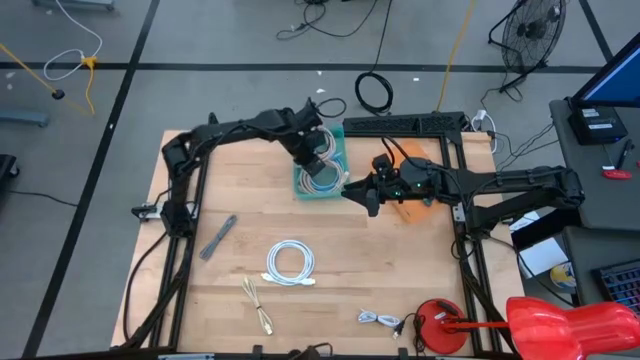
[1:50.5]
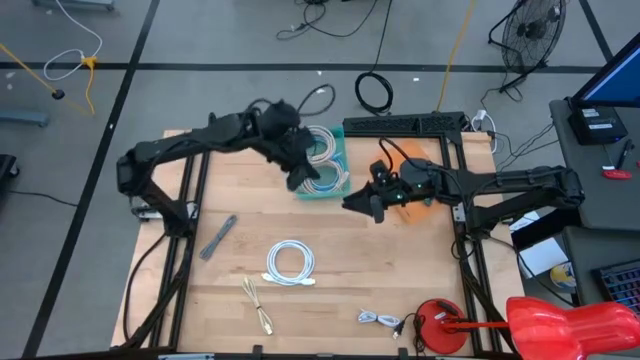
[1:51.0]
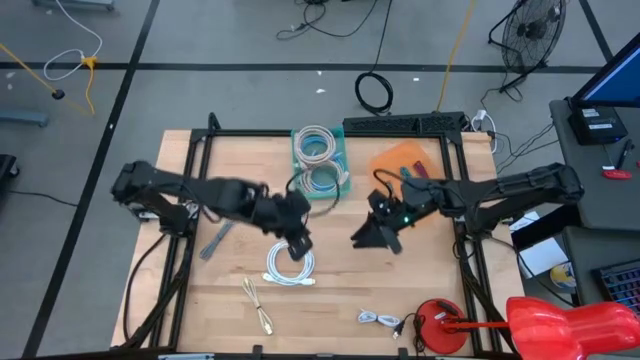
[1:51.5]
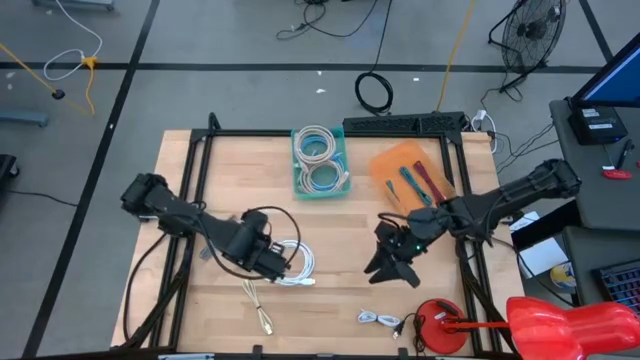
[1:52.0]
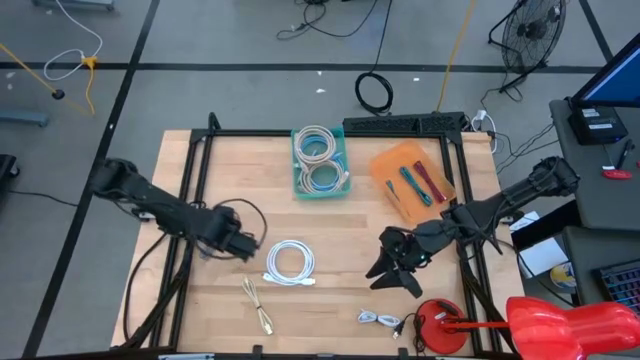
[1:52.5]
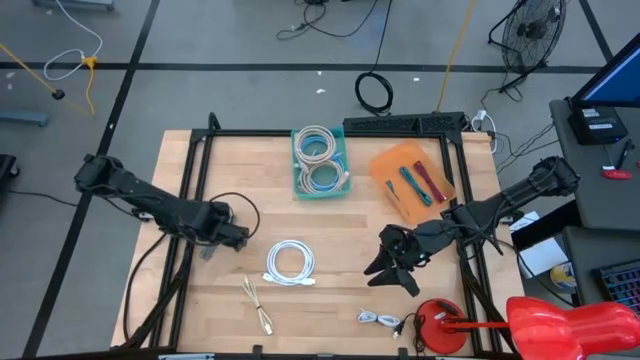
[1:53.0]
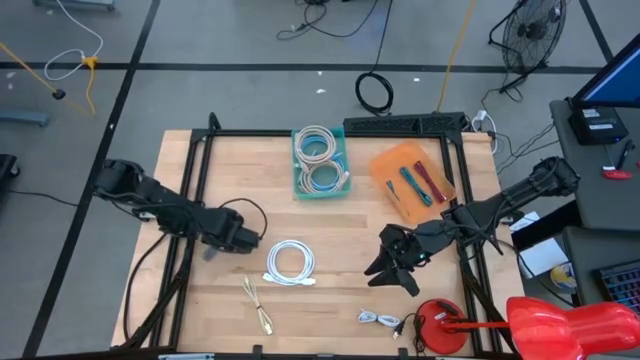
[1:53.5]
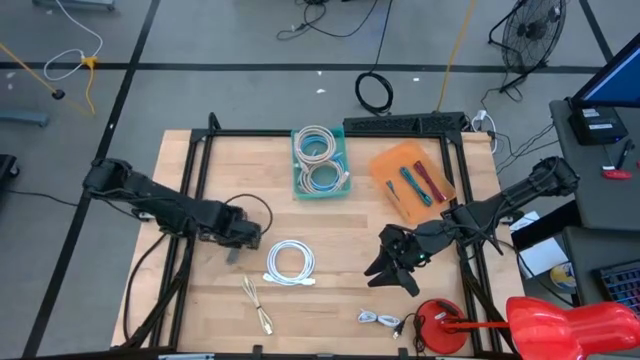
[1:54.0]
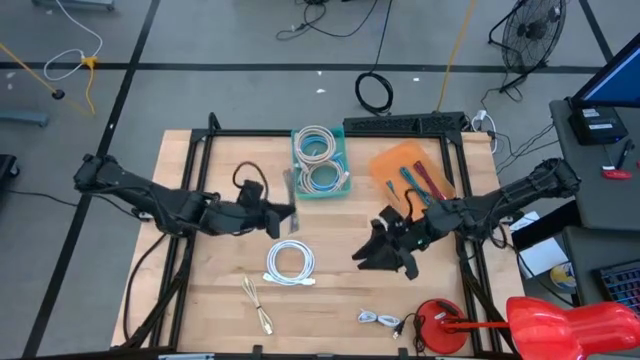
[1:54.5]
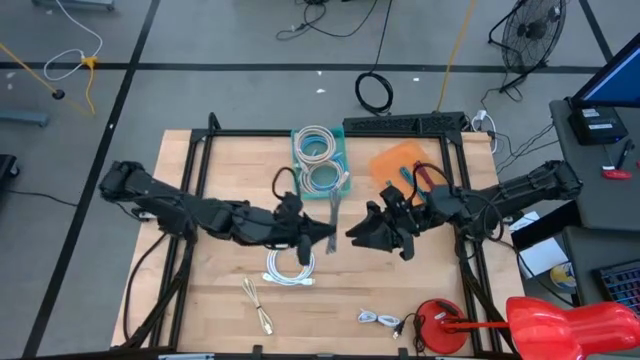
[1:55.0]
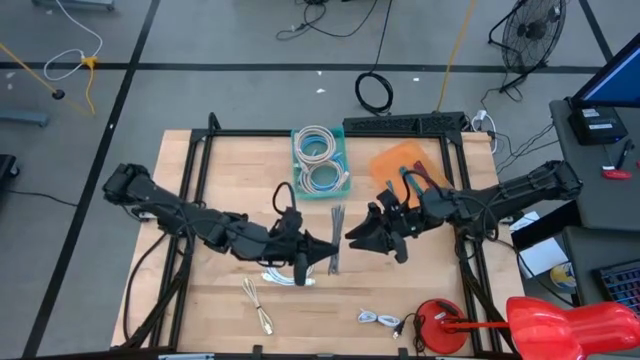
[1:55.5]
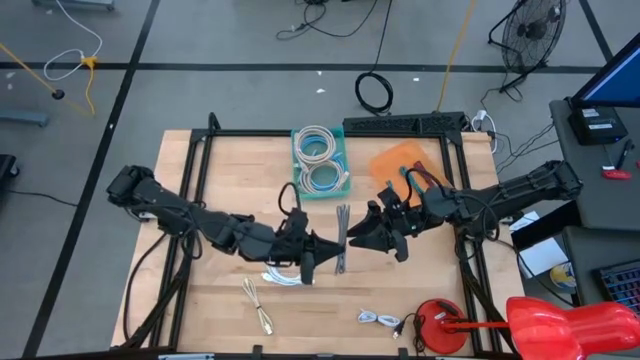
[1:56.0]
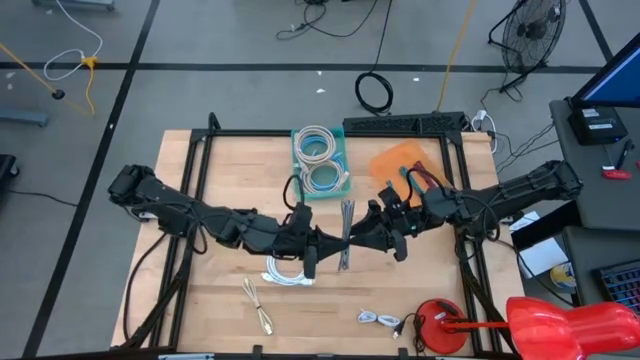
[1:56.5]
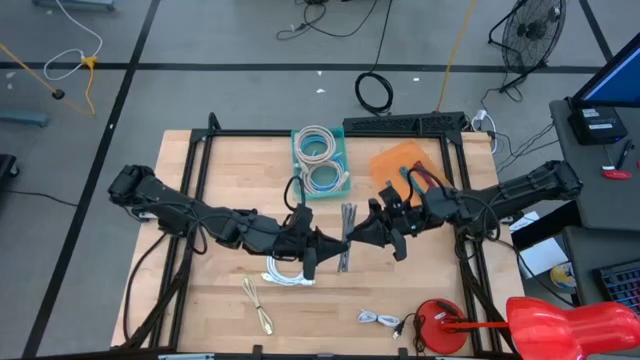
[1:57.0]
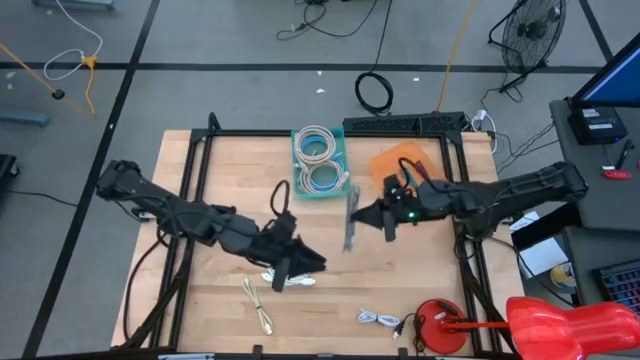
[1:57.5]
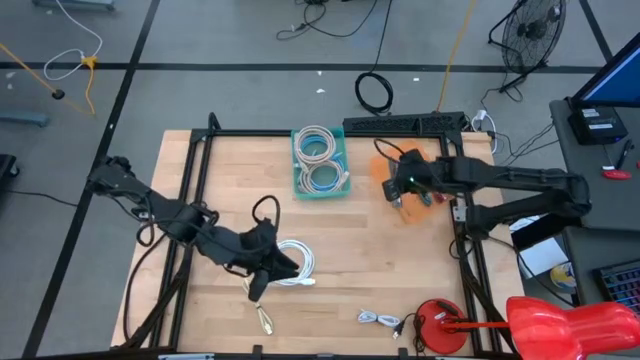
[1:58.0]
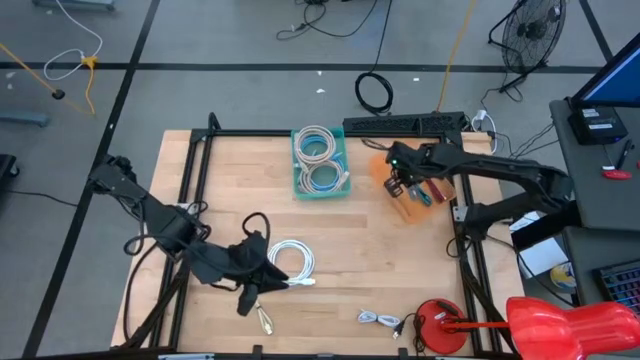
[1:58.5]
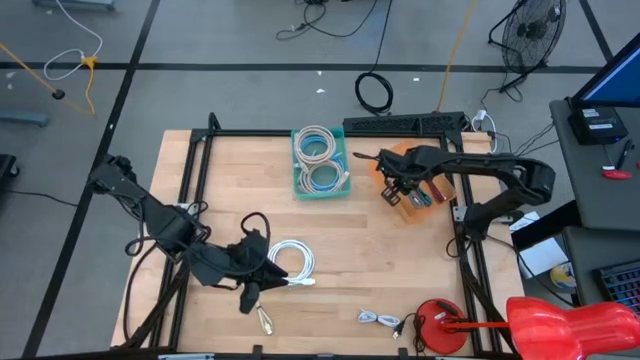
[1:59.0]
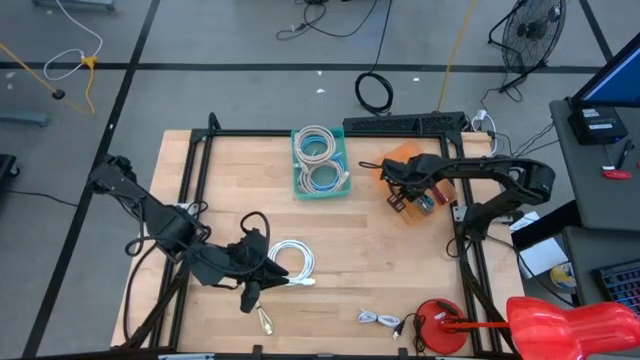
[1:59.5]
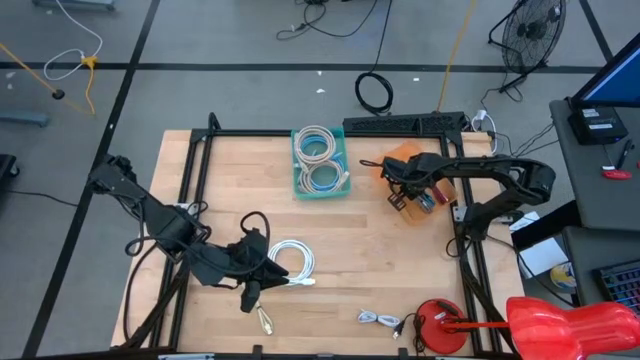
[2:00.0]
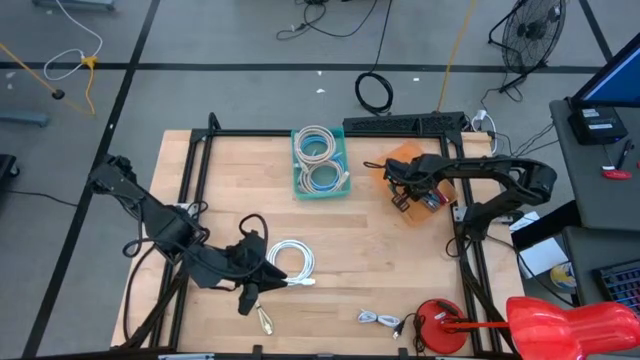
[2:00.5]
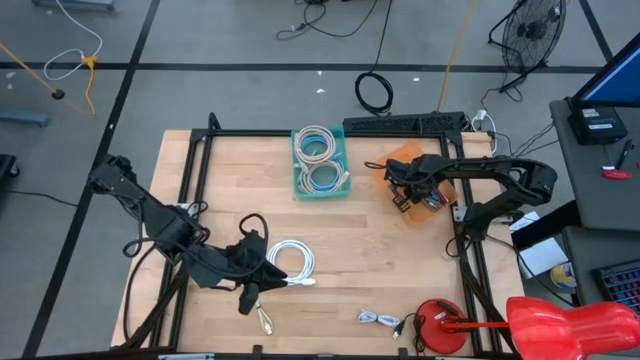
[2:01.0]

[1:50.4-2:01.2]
Task: Pick & Place USB Port
Put the black white charger cable into the orange bin

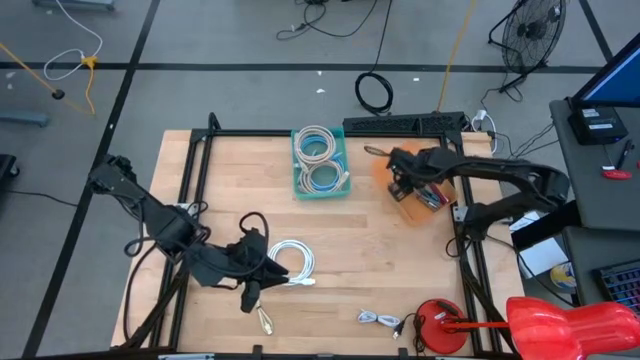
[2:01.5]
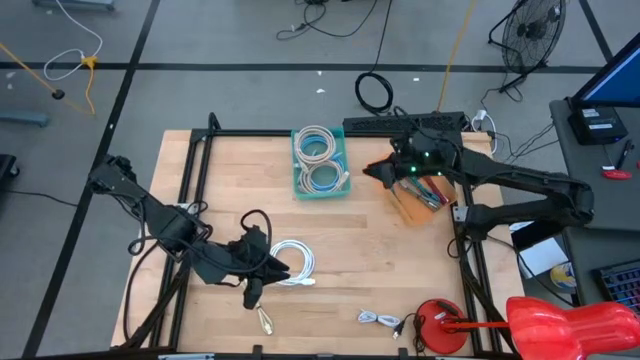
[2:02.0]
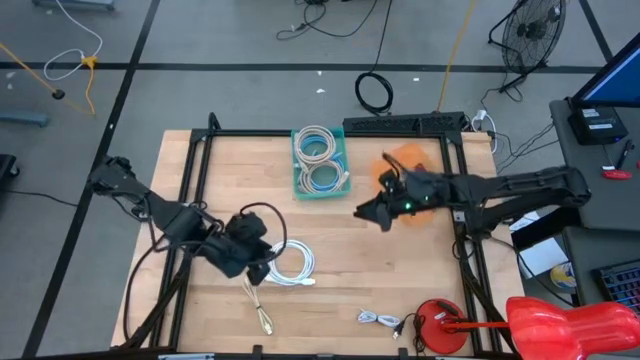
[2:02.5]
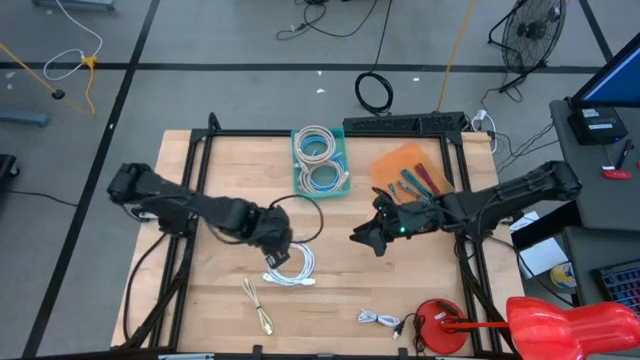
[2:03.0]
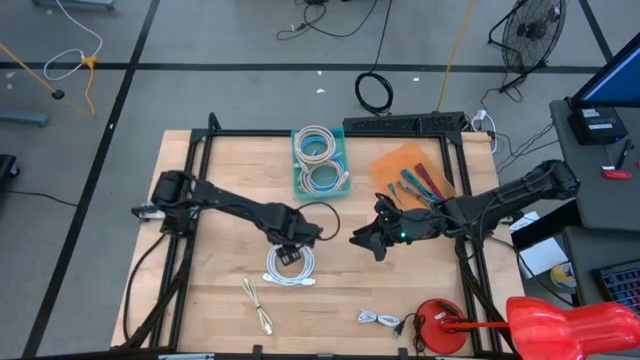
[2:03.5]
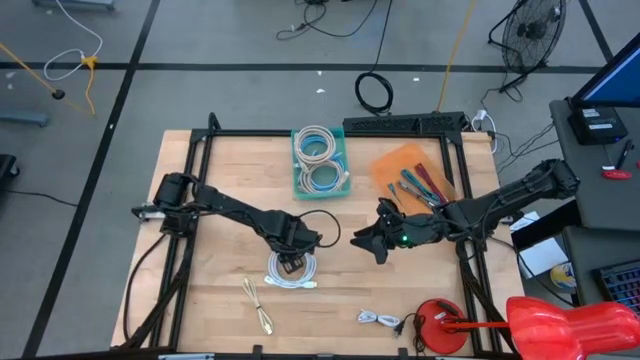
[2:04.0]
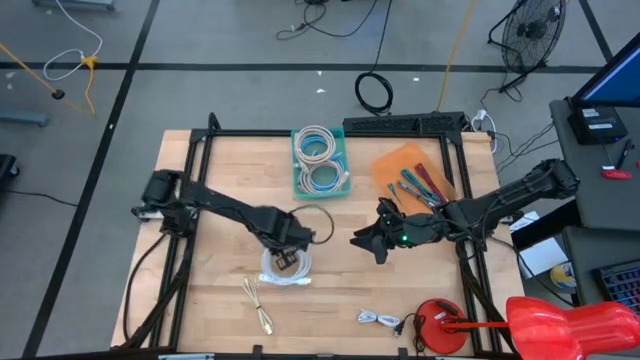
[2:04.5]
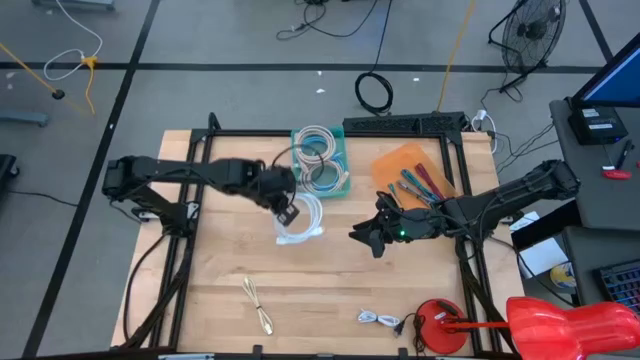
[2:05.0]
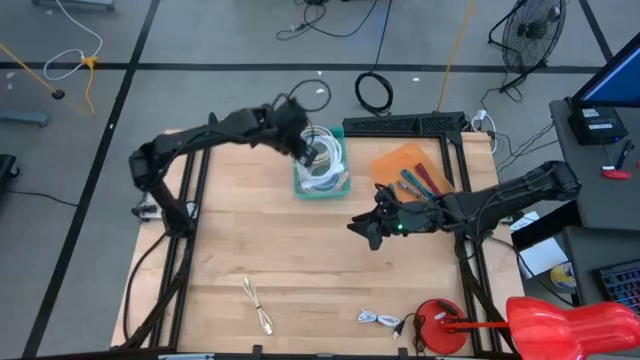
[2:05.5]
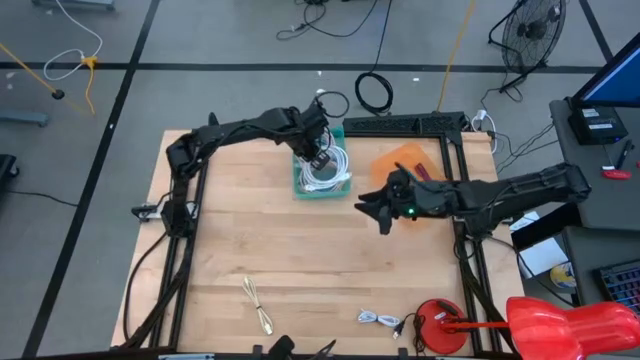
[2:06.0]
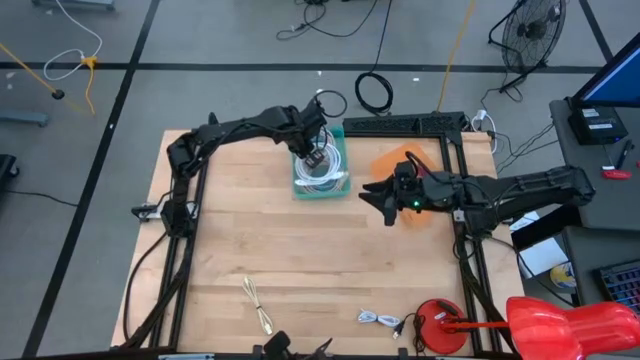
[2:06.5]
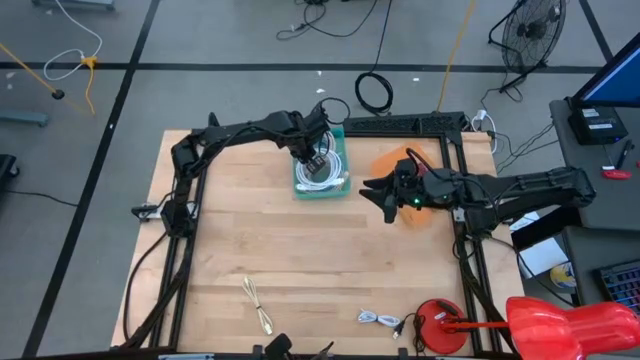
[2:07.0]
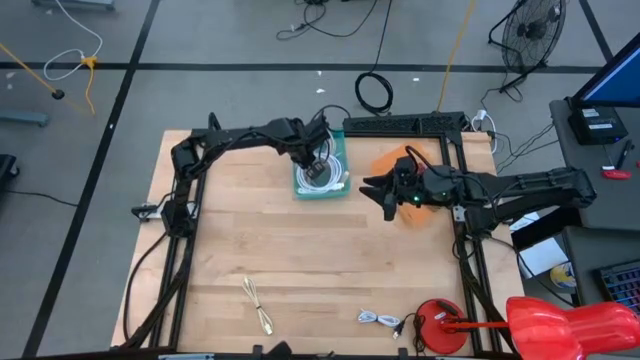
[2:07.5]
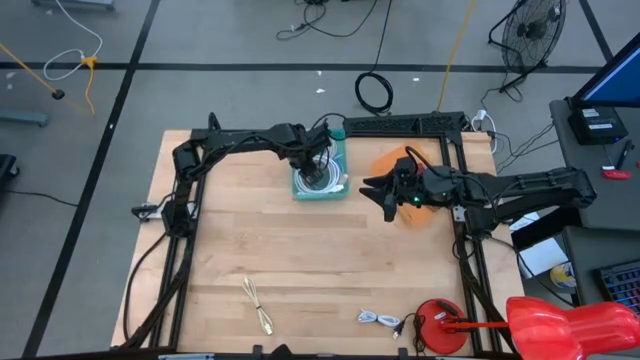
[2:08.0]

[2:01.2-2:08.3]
Put the top white charger cable into the green bin

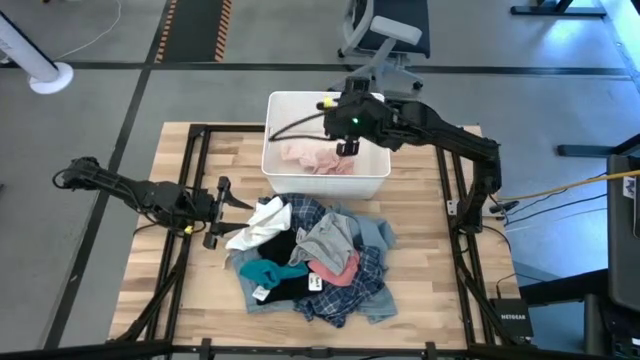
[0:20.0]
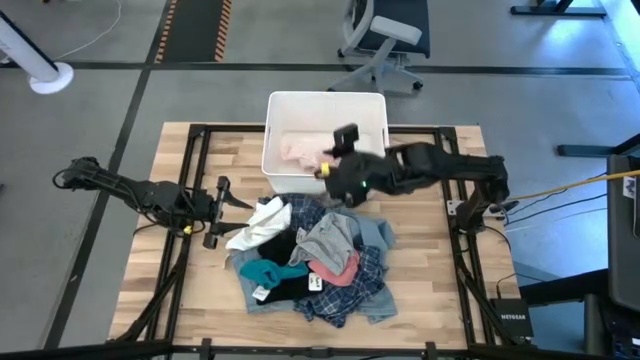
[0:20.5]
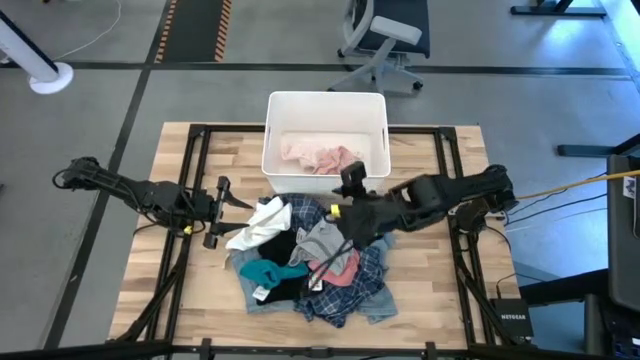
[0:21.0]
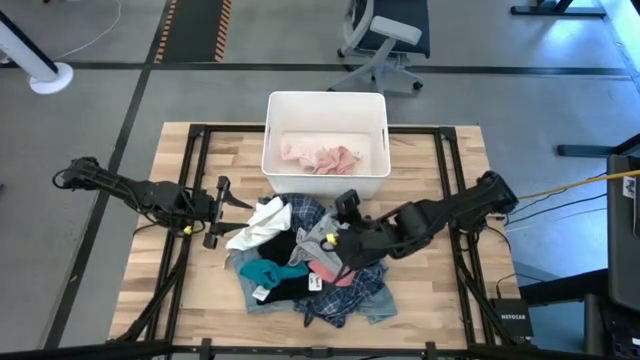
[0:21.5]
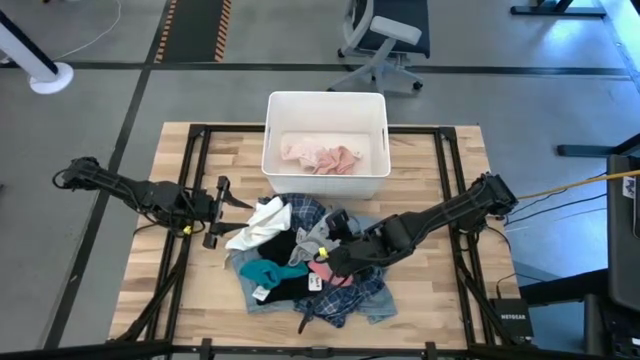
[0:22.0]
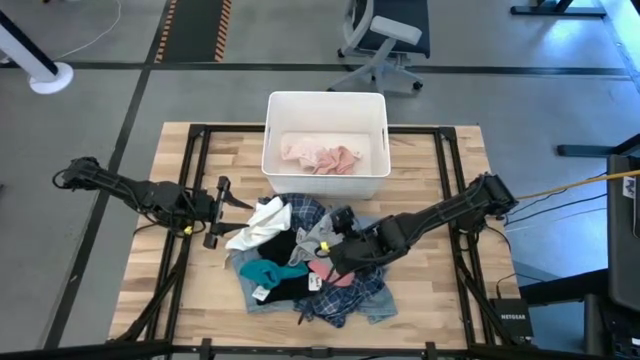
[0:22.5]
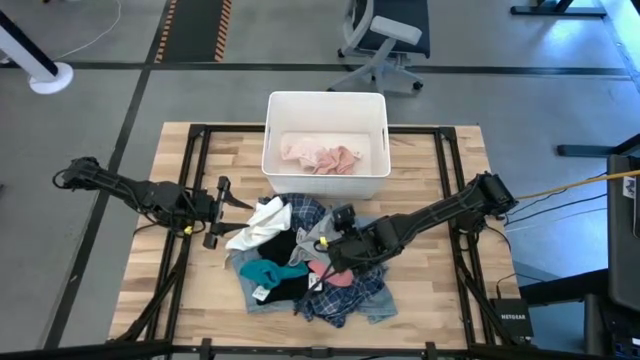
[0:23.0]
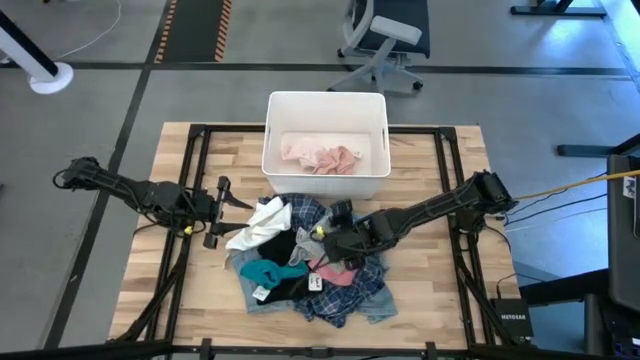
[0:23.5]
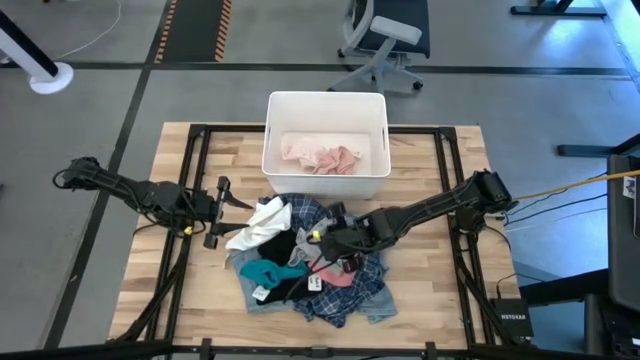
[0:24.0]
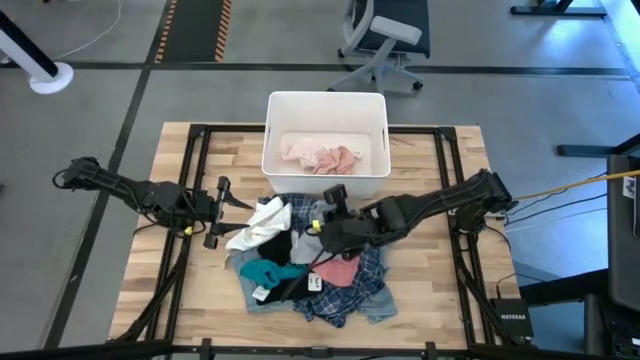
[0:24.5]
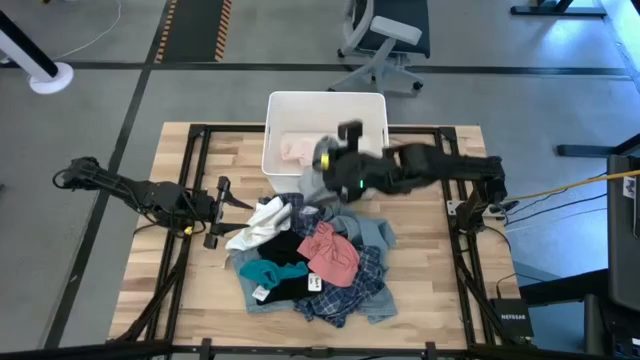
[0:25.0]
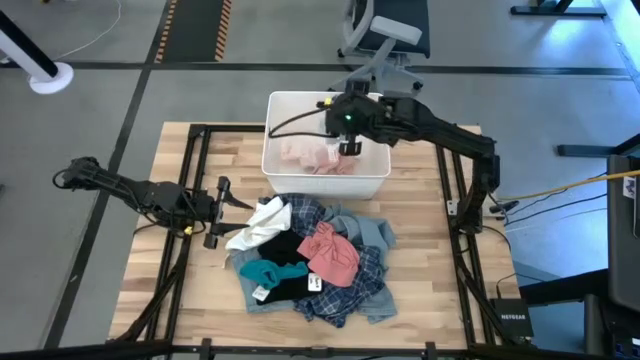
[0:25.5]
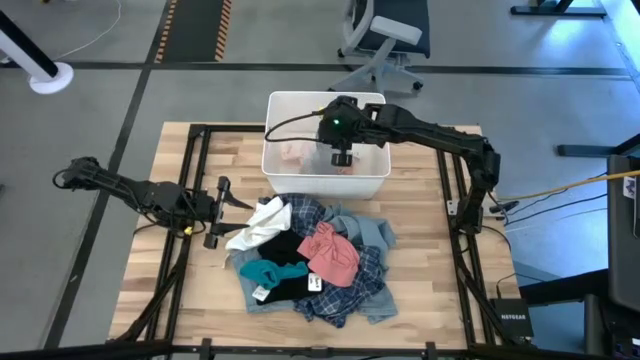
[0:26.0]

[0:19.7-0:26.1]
Task: Sort clothes
Put the gray boxer into the white laundry bin
